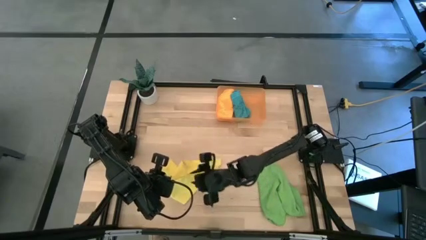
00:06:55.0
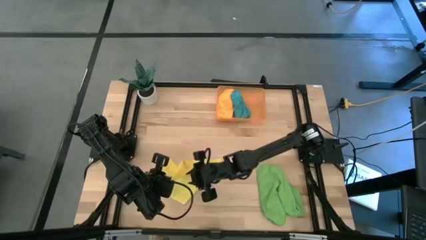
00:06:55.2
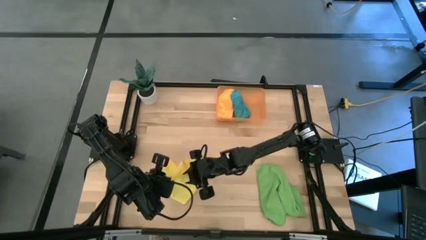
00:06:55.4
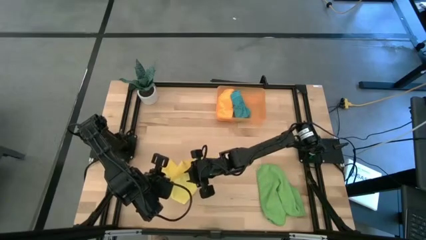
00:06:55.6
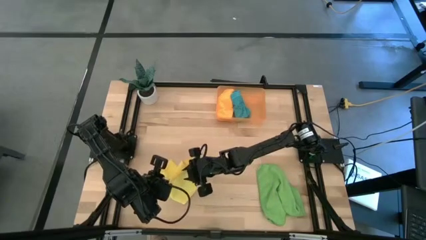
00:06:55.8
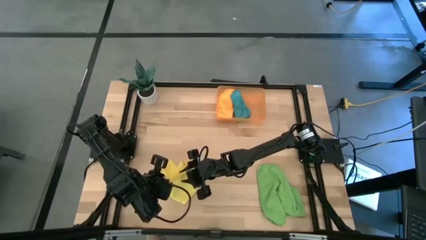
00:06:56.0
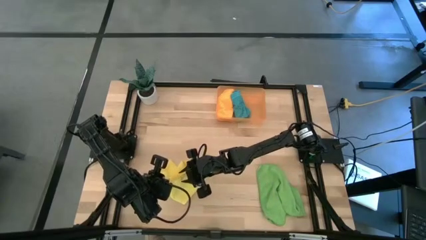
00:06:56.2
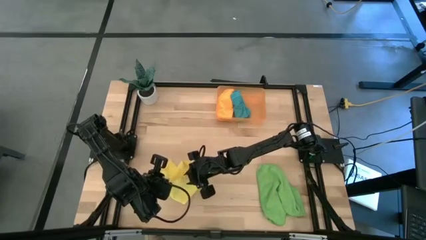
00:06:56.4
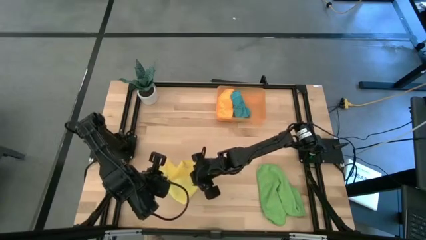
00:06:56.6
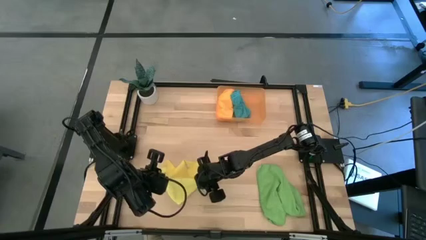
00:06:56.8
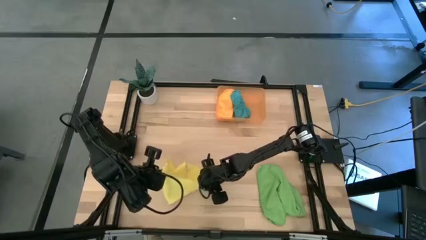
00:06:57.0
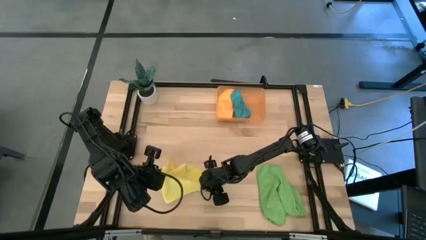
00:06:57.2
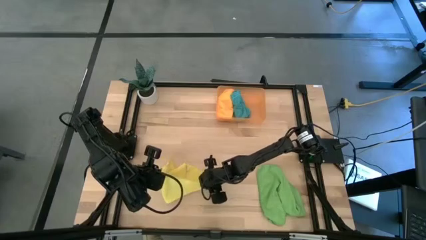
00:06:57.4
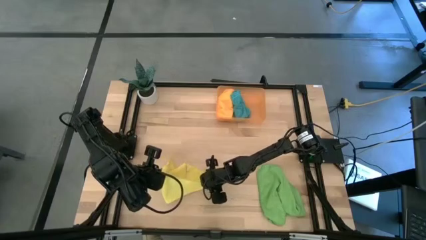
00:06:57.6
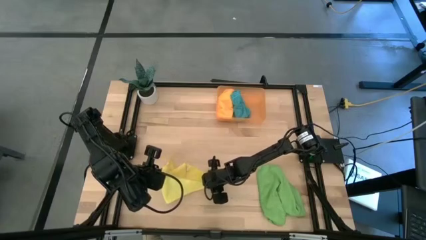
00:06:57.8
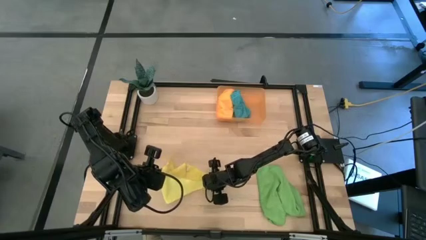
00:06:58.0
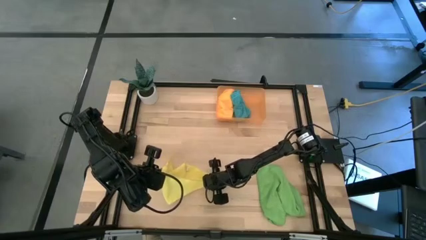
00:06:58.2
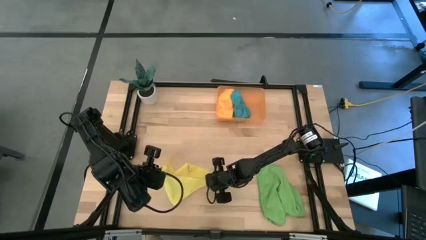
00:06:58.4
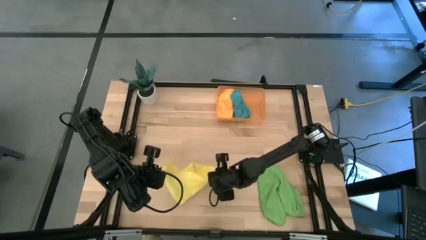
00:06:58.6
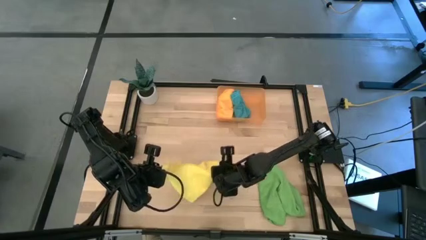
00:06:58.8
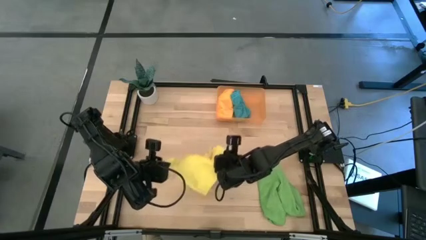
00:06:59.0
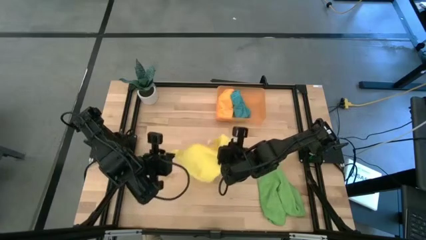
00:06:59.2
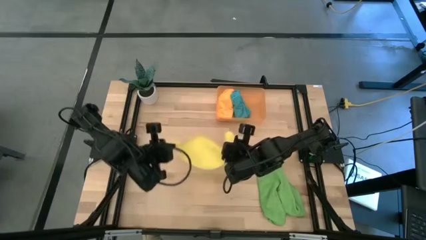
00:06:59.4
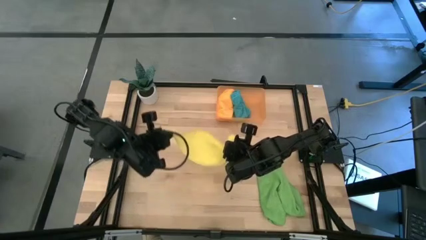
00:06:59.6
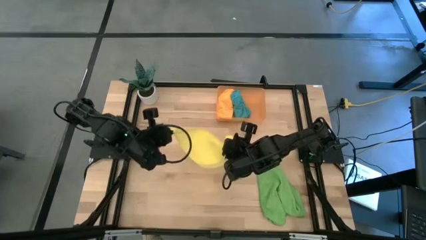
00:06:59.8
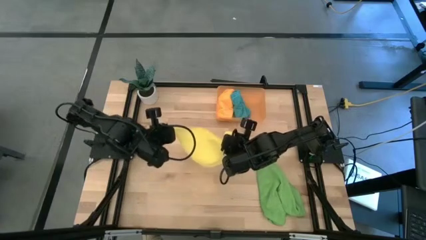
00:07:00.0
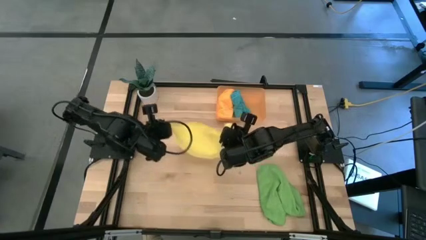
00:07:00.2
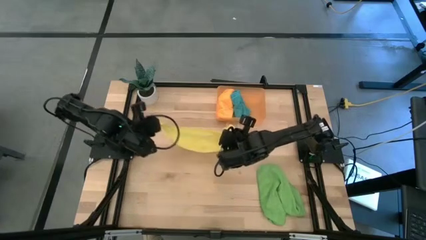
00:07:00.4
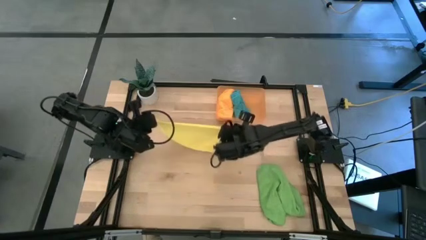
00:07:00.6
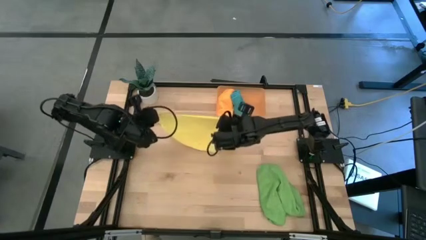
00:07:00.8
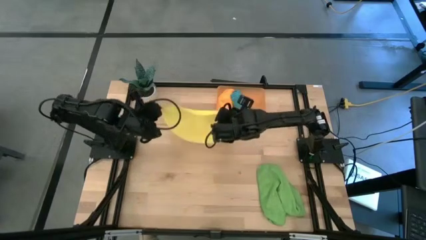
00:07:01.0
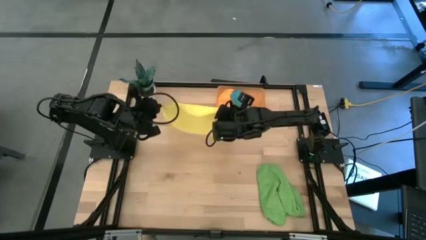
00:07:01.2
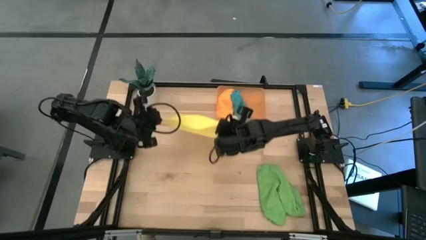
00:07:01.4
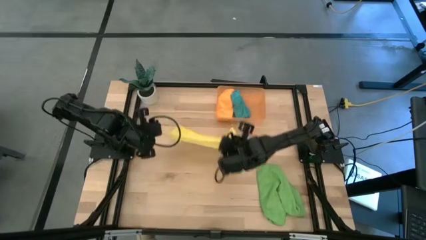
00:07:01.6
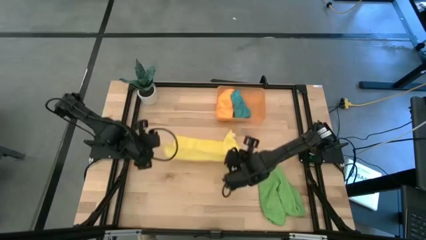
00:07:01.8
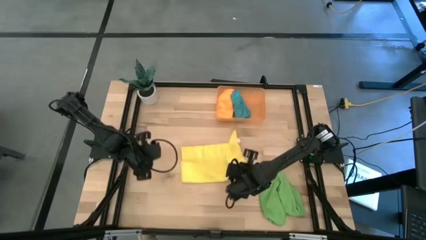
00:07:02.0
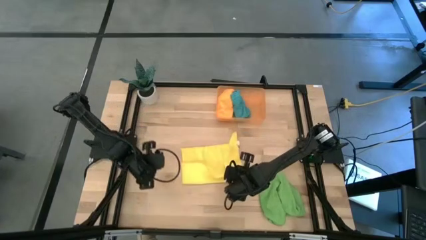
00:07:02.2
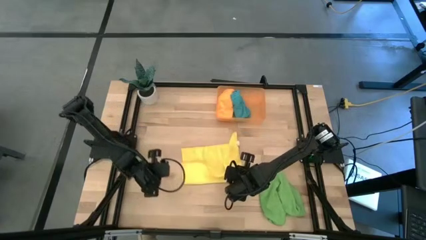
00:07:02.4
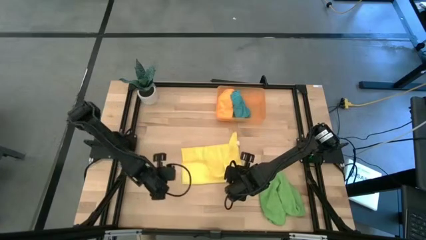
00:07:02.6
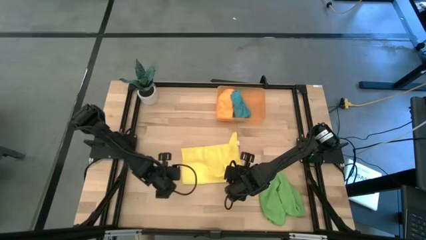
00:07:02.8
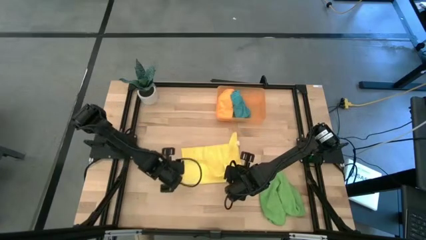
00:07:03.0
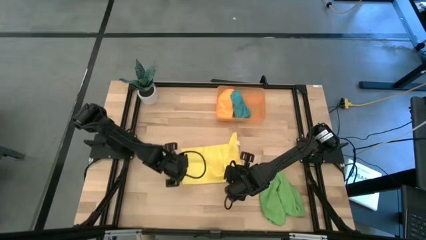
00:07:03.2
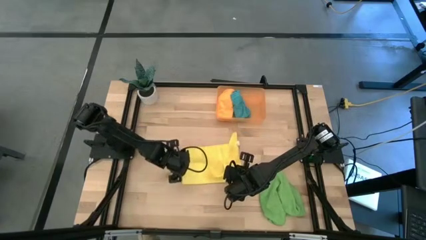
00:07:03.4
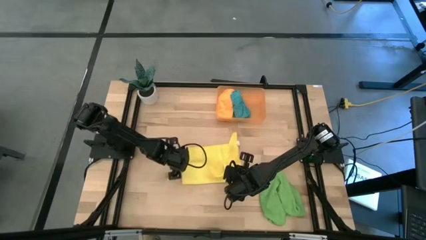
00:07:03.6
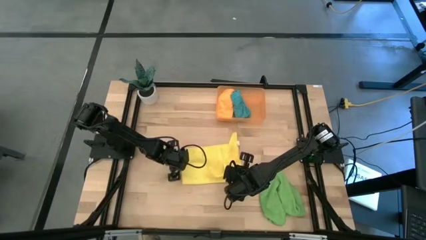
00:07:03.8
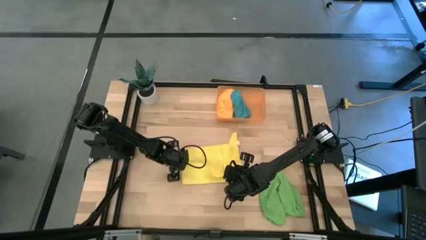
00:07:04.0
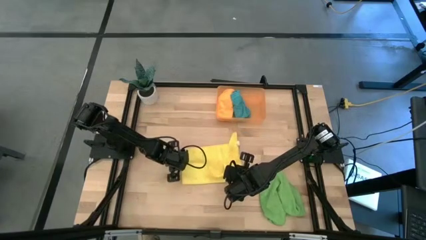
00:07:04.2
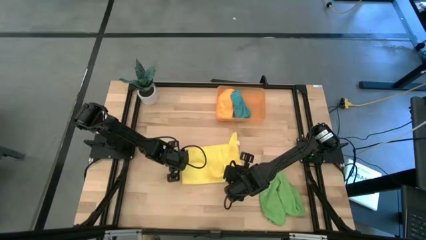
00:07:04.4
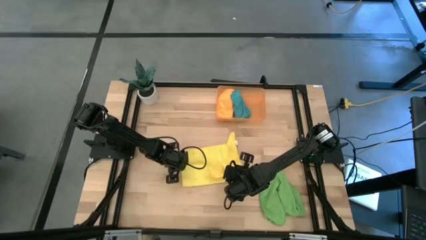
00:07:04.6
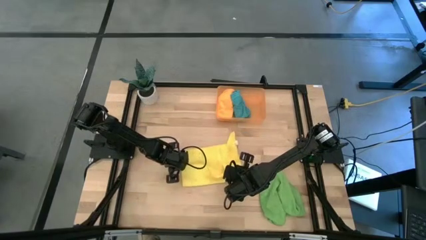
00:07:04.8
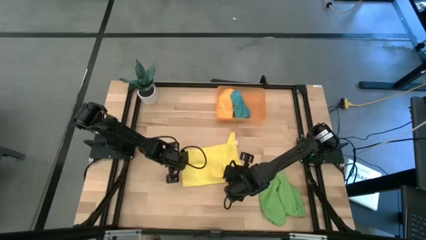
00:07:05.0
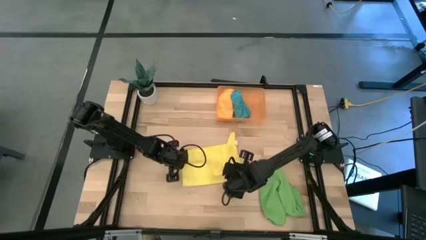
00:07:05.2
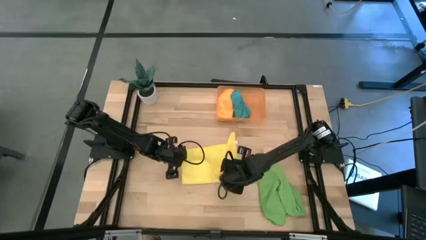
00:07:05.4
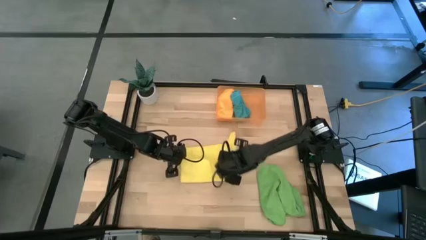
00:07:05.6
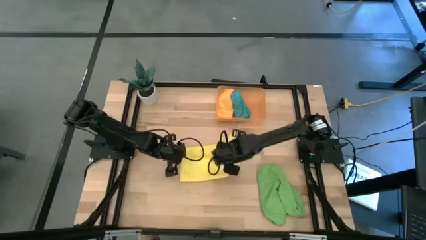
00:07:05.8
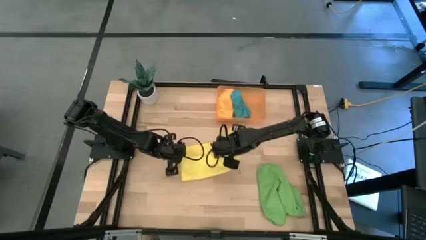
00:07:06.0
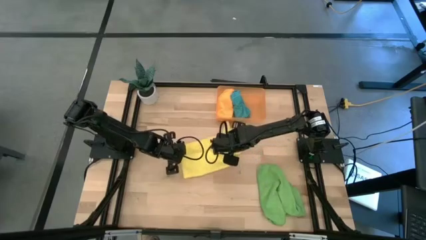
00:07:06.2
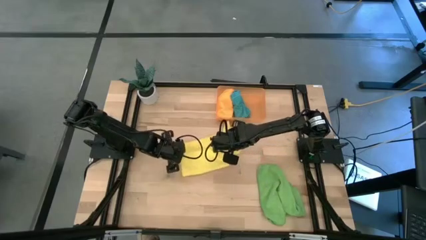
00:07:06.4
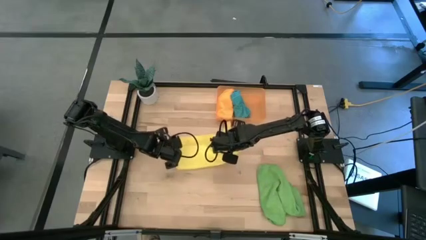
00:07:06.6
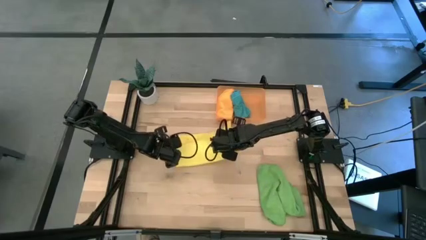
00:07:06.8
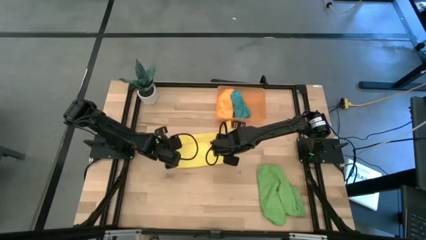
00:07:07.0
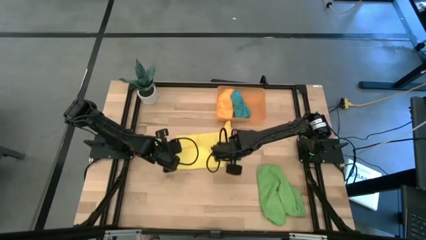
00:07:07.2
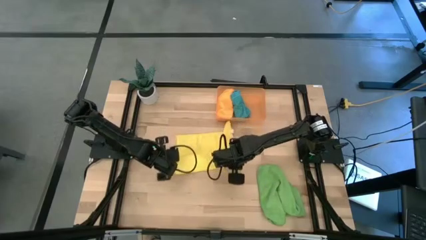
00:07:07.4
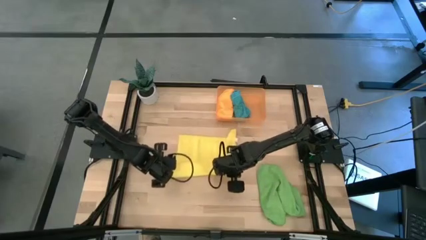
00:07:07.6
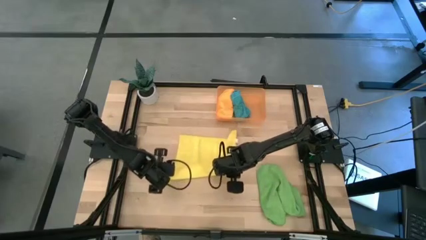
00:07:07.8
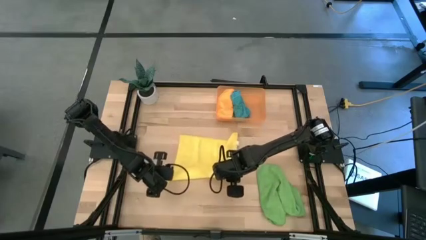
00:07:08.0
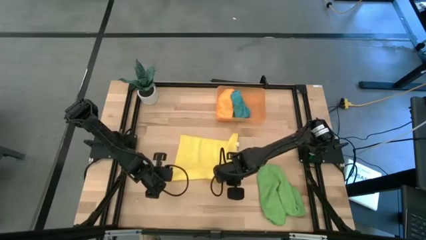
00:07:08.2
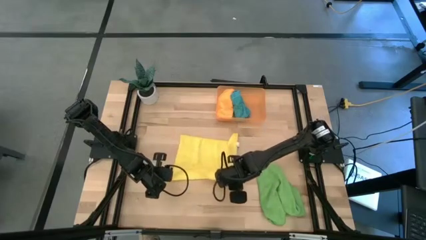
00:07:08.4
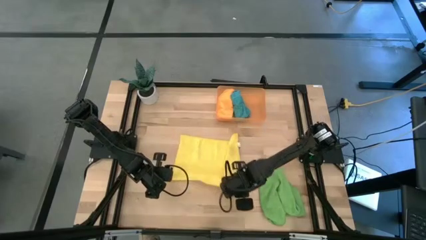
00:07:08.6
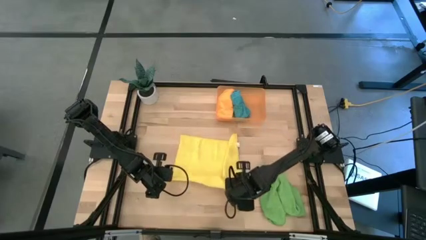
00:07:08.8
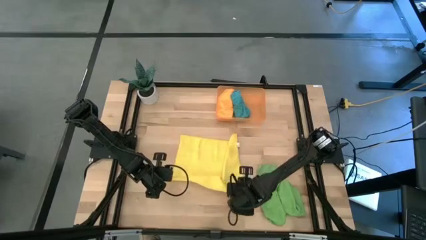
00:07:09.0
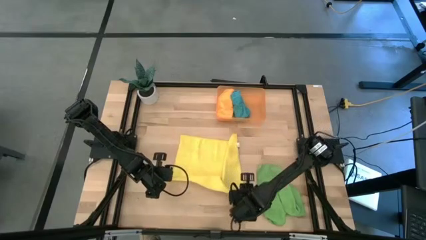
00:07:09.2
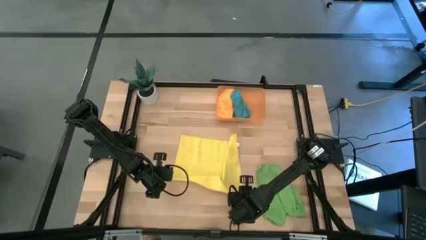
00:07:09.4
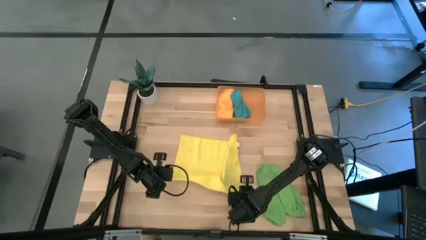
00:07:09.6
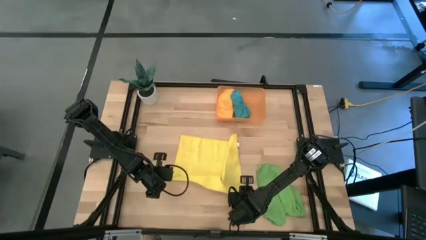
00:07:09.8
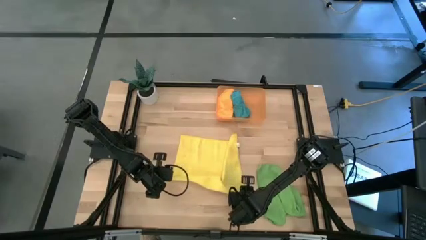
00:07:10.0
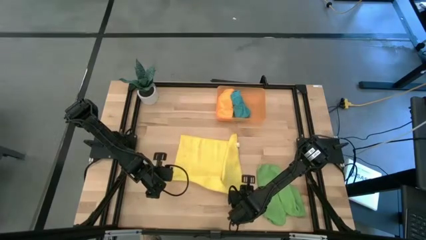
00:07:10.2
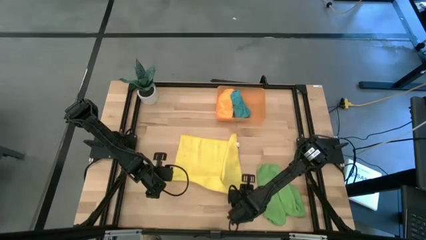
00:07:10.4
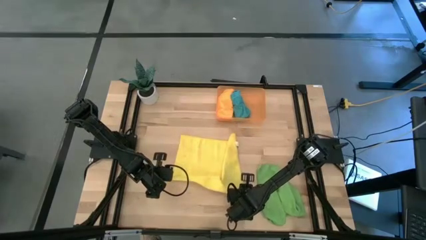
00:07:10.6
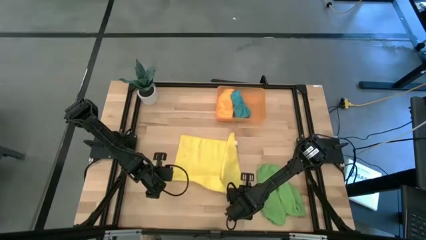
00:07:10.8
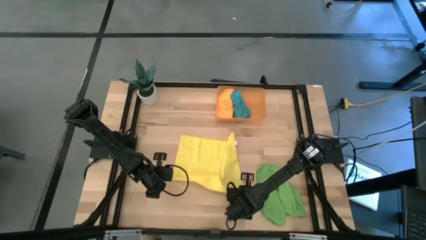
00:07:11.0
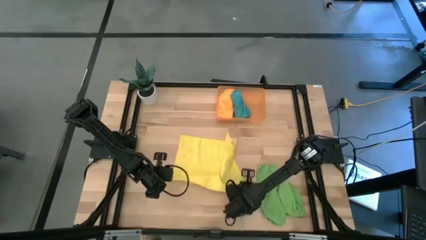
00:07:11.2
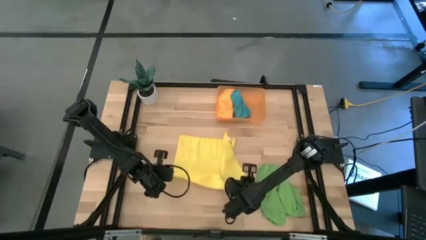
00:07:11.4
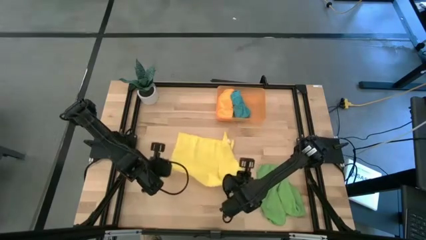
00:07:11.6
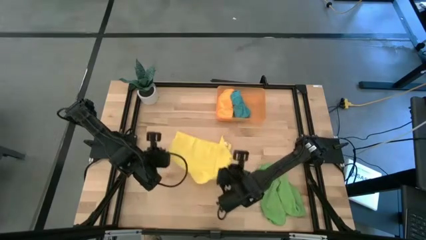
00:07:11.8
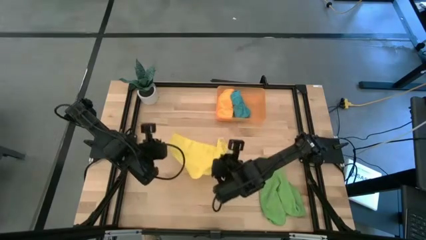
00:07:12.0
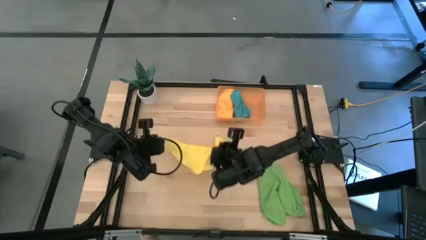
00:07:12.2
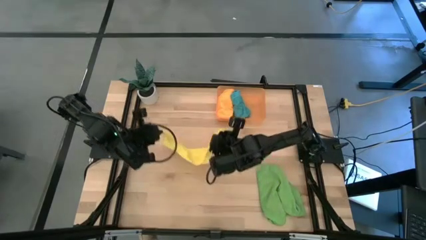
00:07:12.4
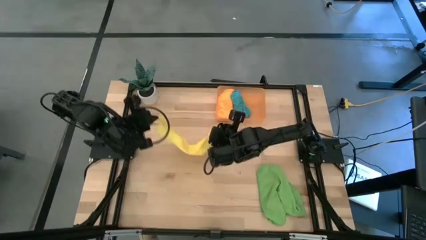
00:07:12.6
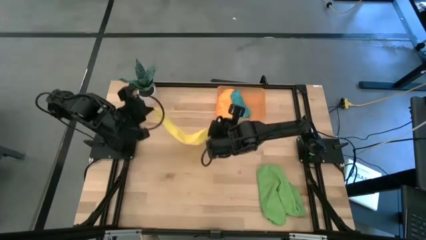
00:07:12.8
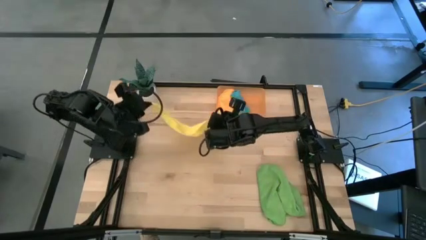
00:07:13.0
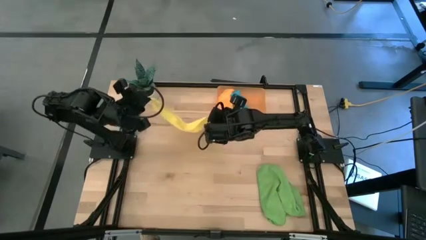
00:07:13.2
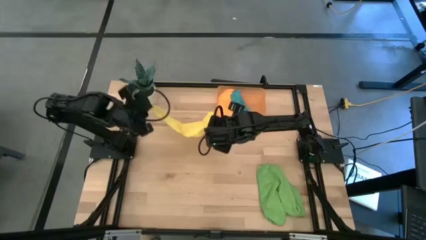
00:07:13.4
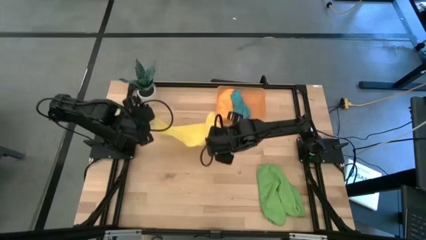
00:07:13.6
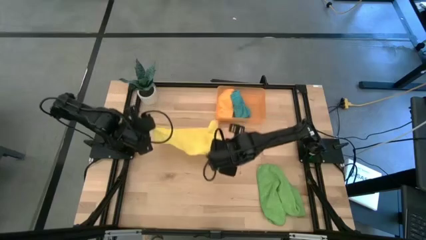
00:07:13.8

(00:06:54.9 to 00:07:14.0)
Task: Roll microfiber towels into tight, uniform cylinder then place into a basket
Roll the yellow microfiber towel
